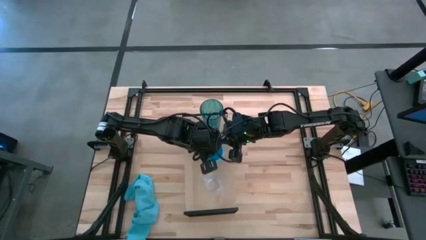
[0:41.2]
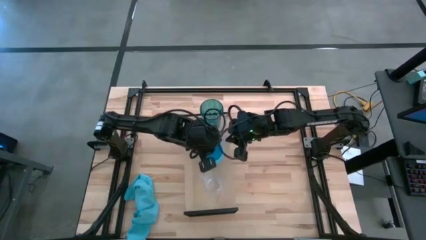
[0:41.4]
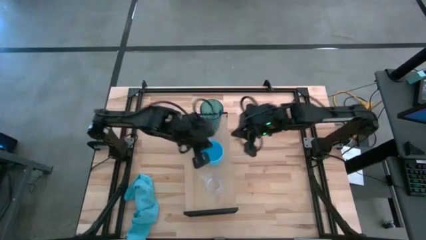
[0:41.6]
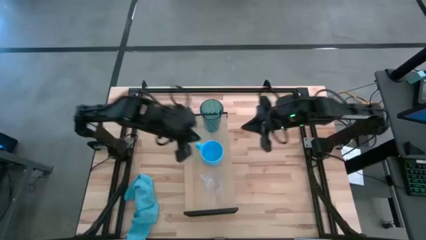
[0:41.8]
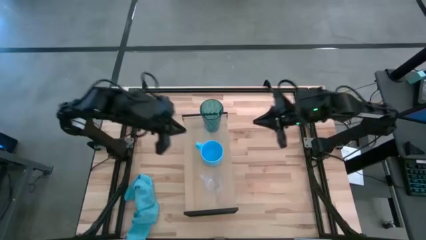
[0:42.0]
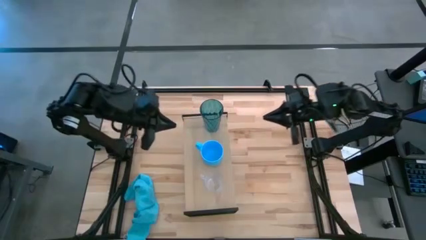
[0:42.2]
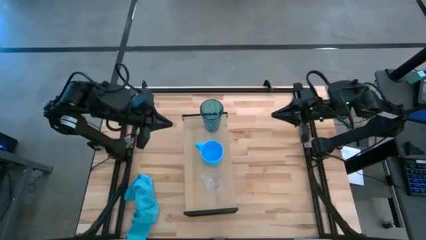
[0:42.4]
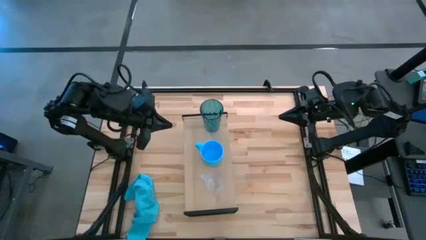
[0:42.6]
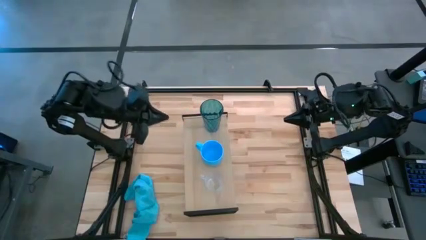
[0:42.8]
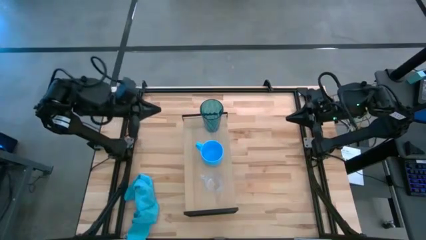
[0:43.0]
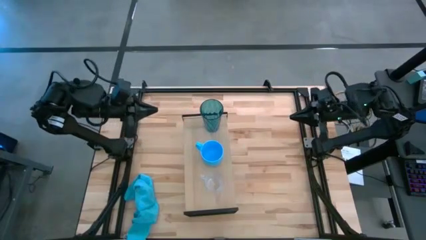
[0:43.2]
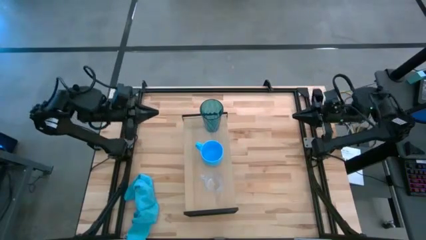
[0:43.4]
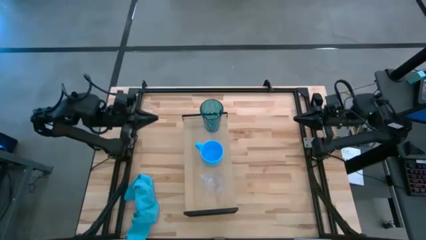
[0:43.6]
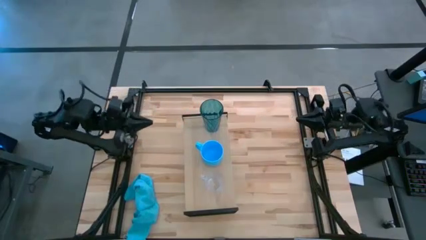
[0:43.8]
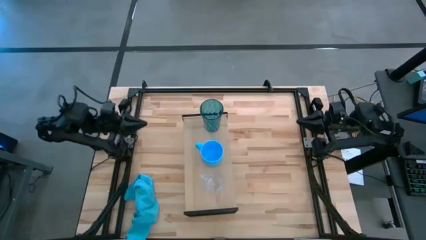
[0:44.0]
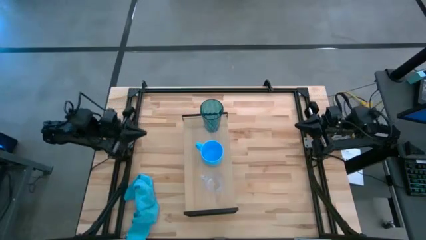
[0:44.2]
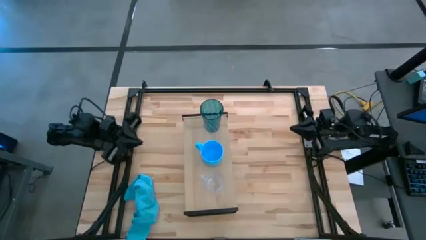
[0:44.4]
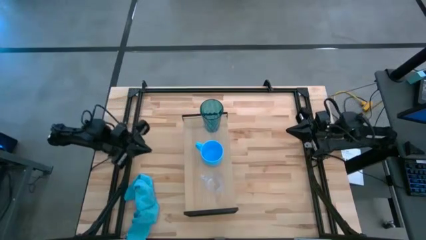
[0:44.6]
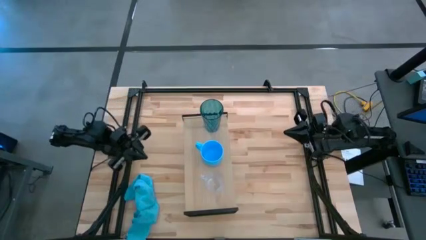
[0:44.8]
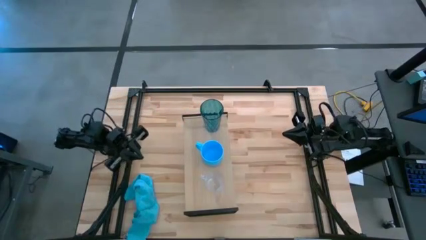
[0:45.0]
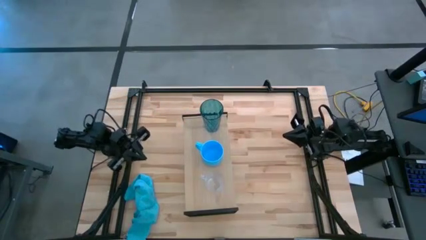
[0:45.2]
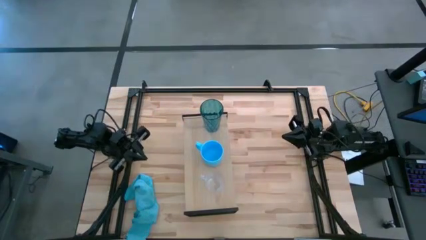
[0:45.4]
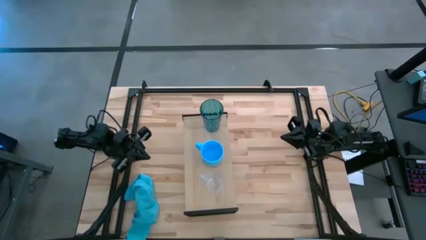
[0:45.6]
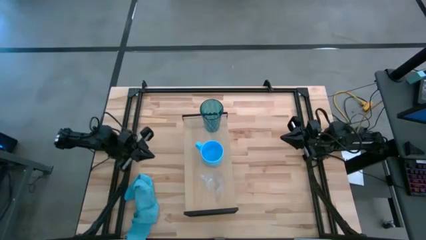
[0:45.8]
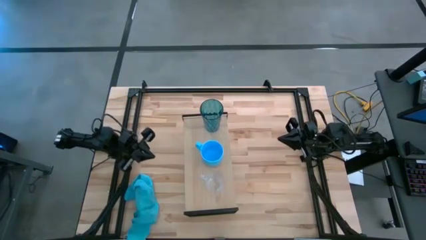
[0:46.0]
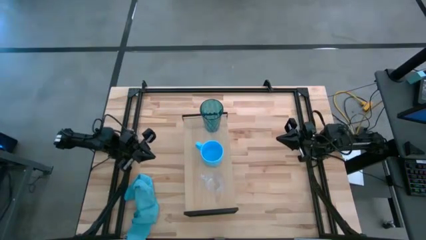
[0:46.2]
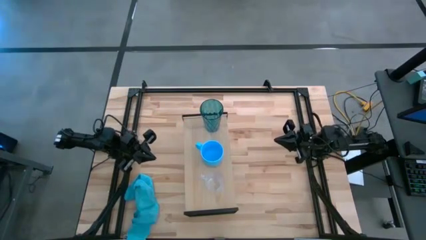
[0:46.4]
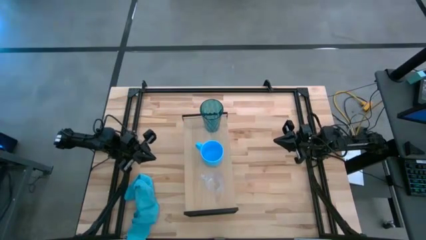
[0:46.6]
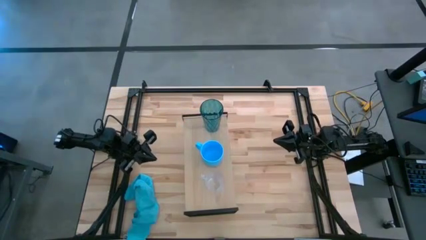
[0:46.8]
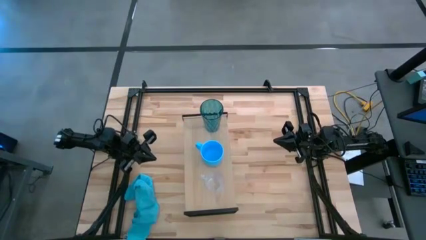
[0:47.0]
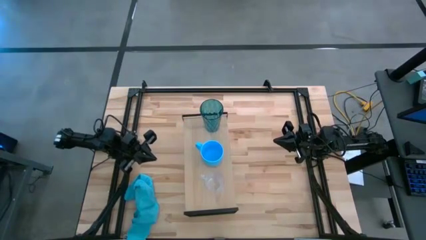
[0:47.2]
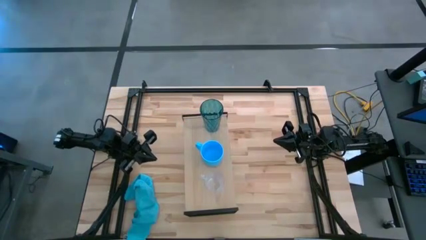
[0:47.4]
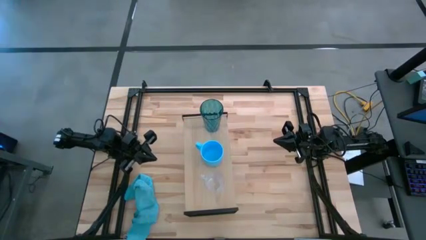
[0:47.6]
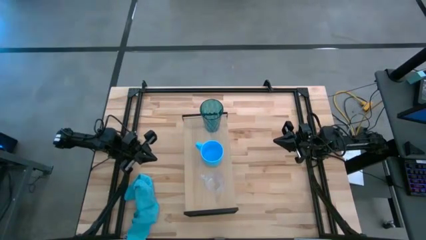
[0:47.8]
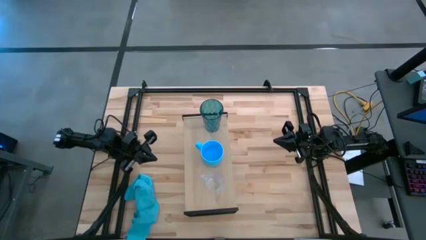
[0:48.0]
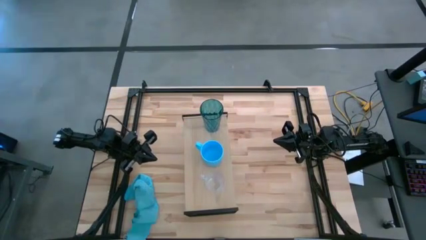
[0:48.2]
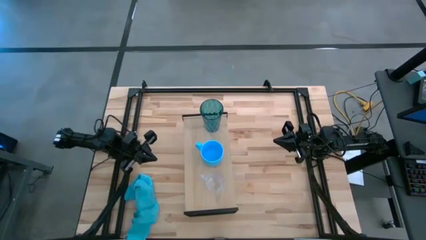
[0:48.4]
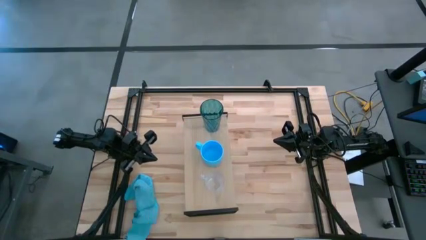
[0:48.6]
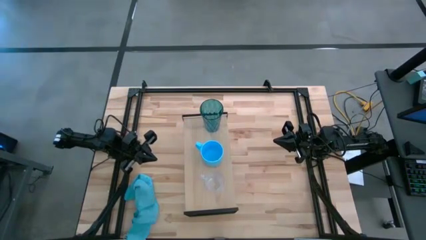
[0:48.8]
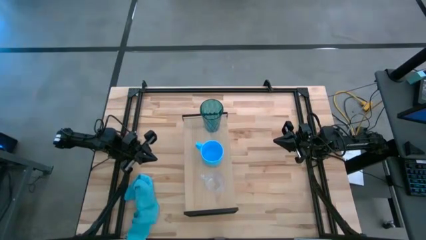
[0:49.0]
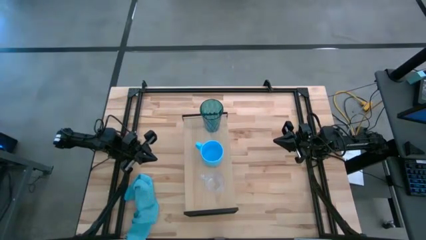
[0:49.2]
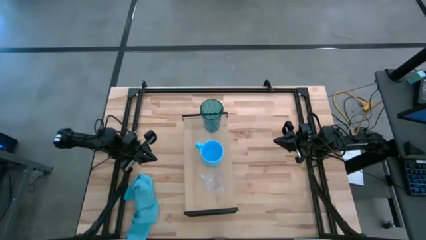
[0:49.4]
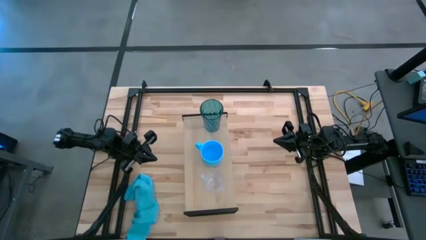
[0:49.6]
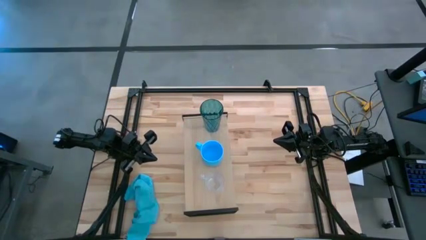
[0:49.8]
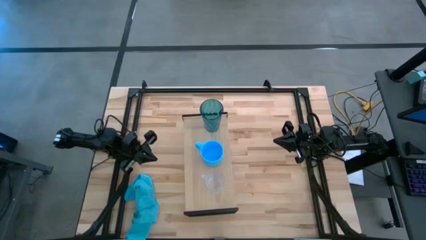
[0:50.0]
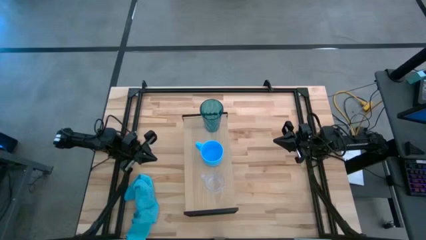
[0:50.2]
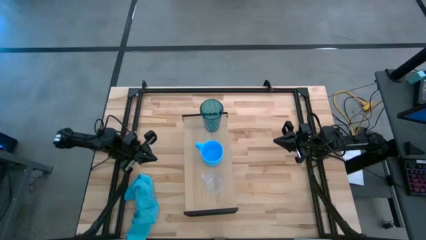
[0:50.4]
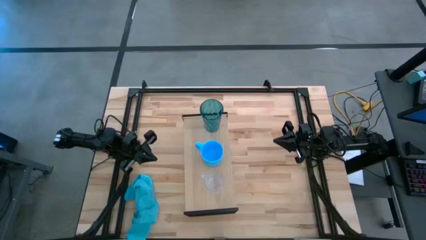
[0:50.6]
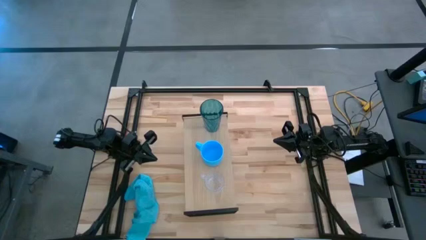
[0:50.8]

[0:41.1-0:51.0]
Task: Stack small to large cups/mugs on shelf
Return to Home Position
